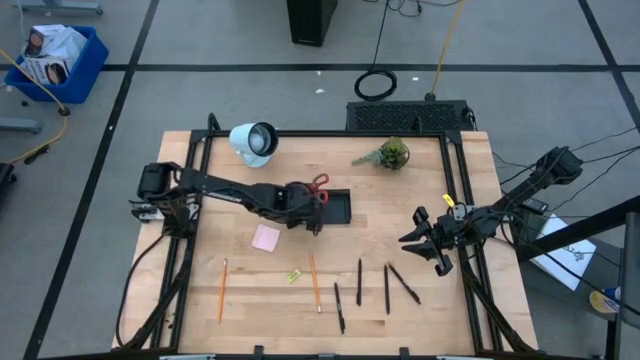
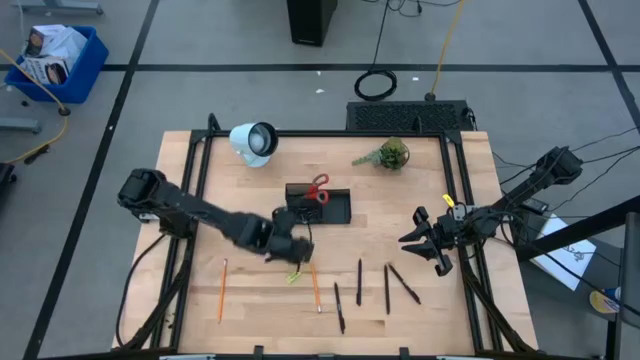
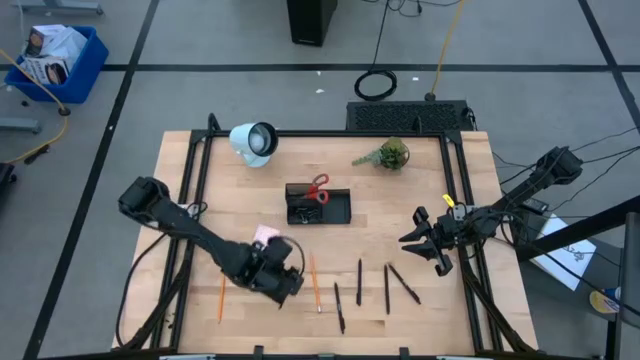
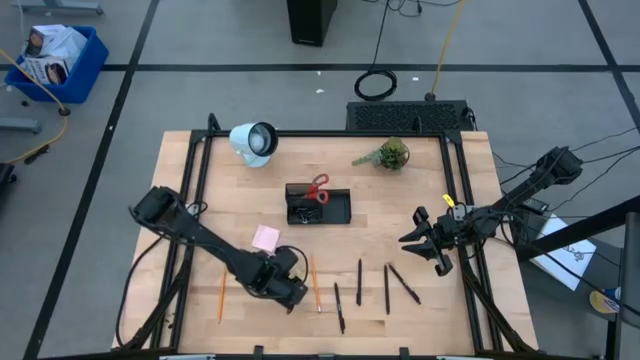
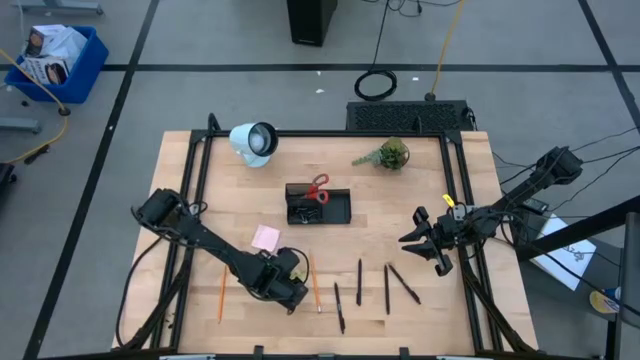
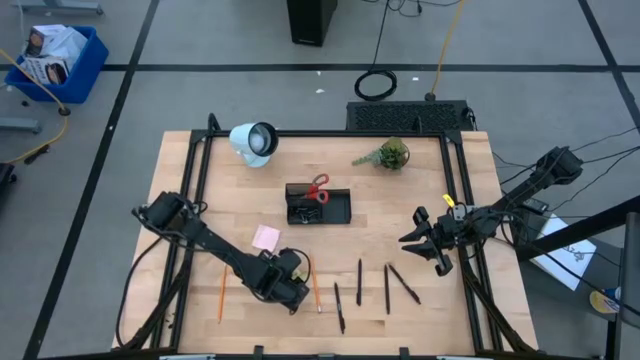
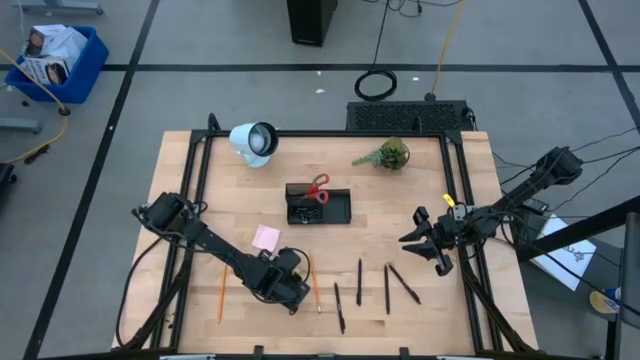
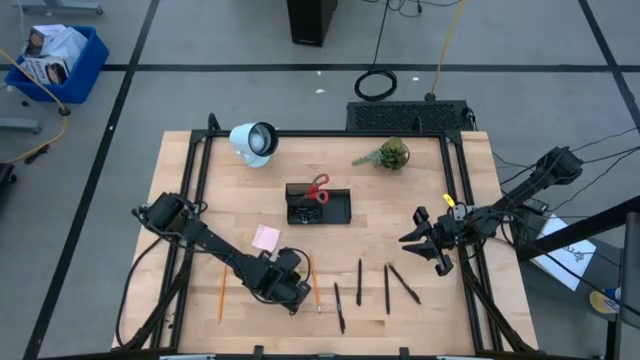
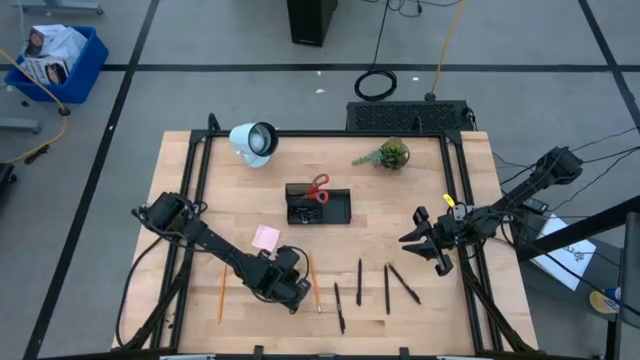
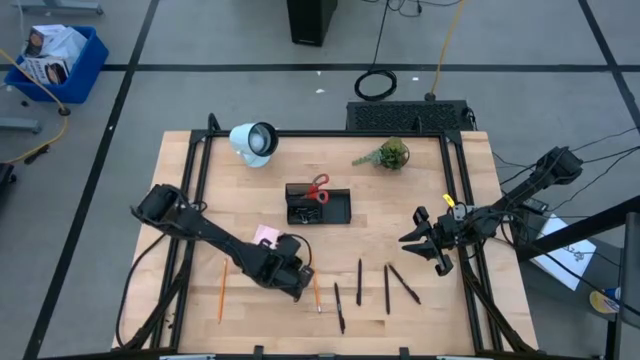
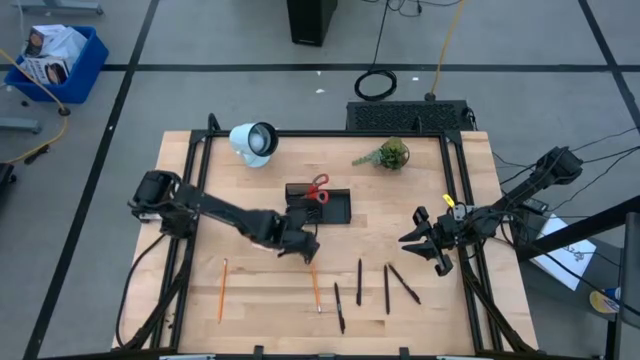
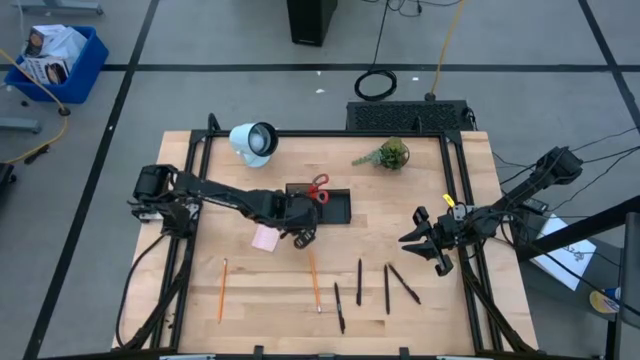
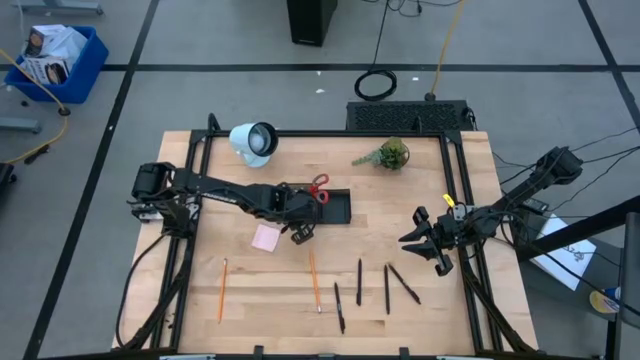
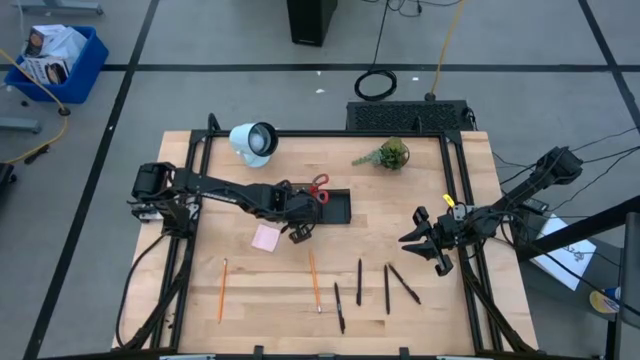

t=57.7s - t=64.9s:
Task: Pick and place office supplies into organizer
Put the yellow eraser into the black desk organizer

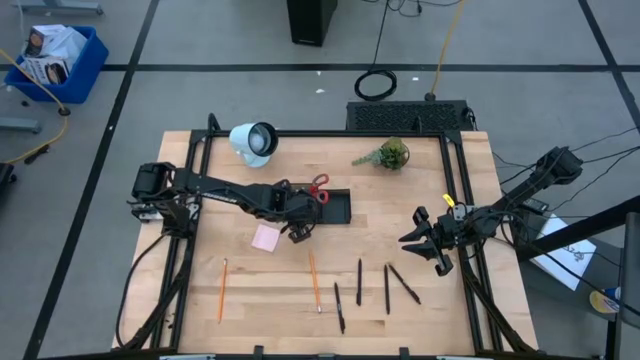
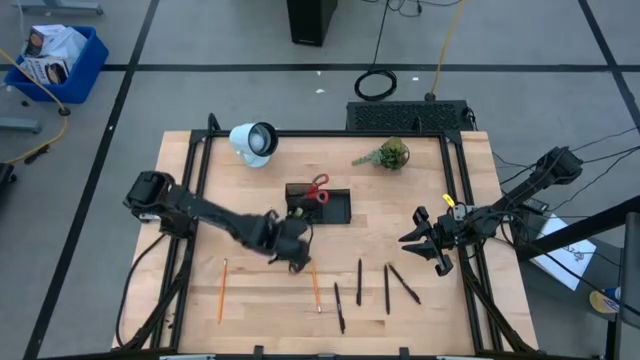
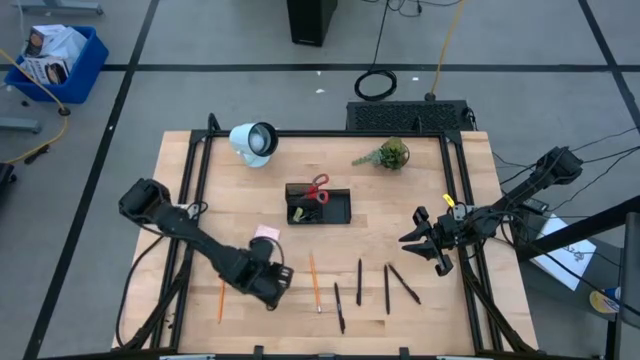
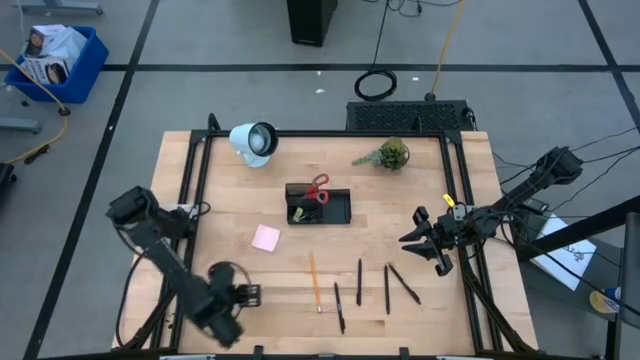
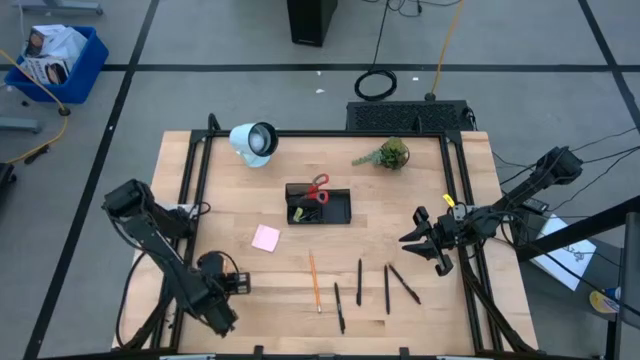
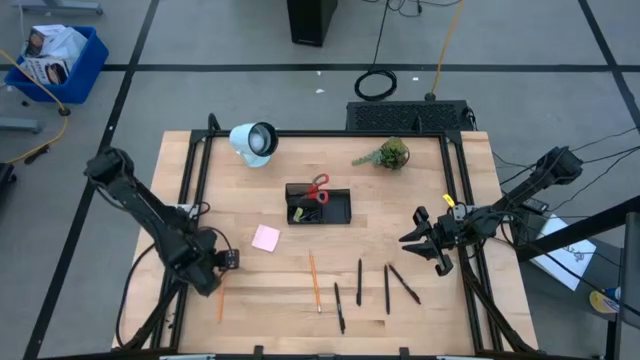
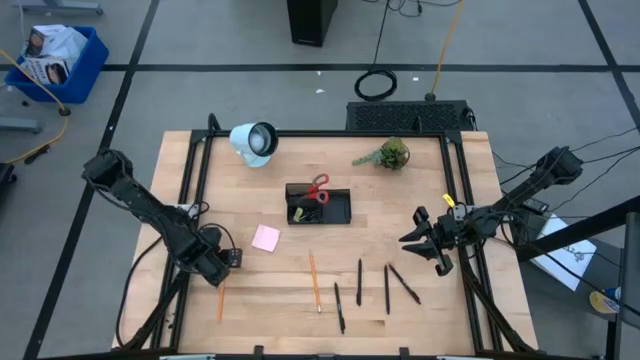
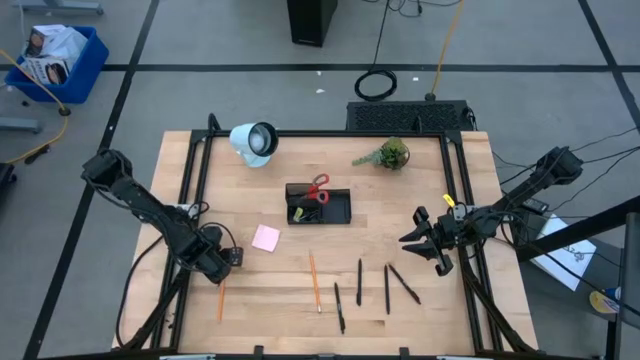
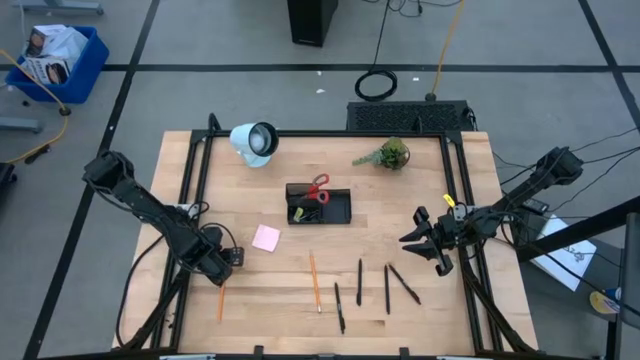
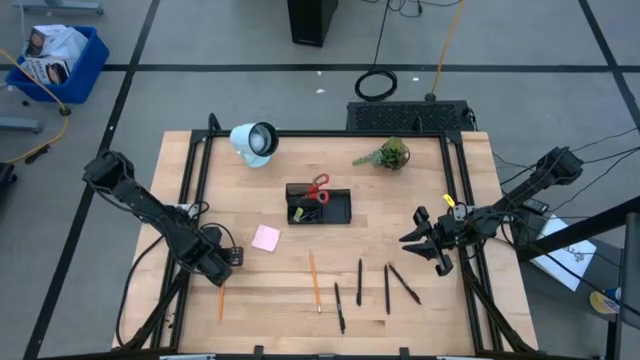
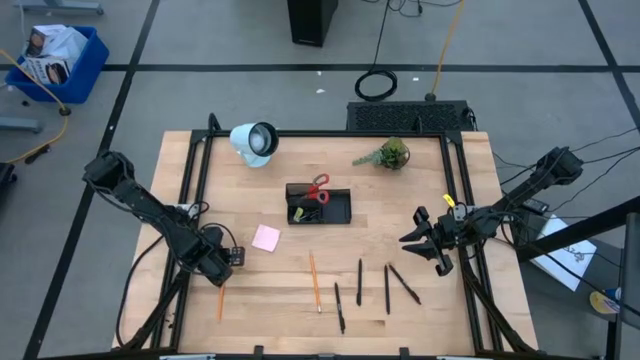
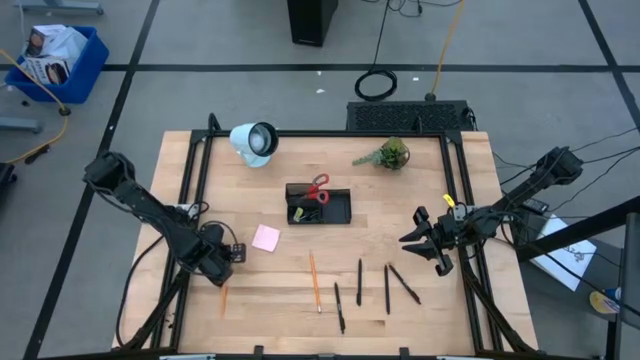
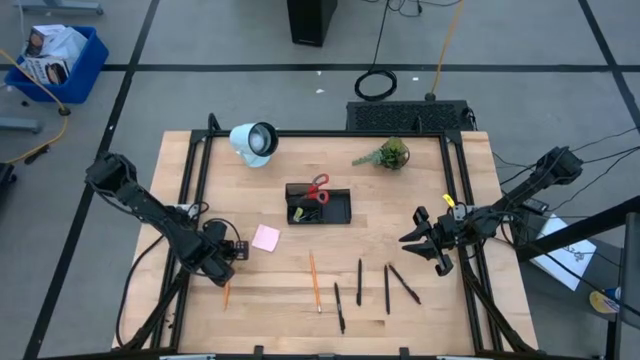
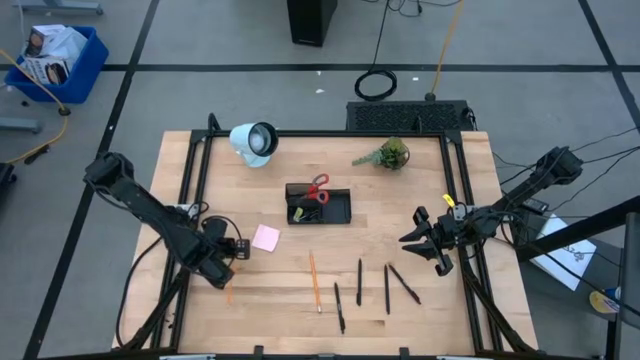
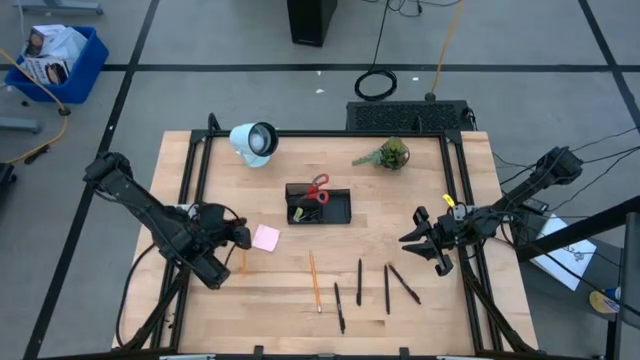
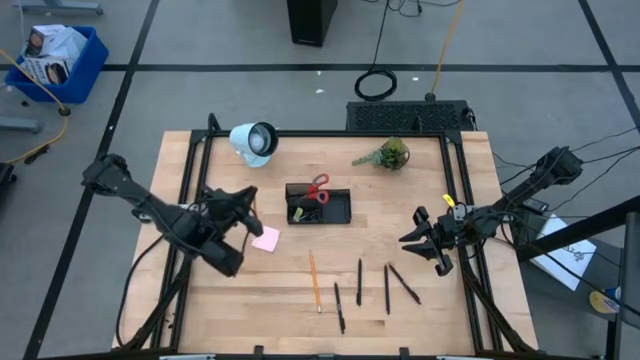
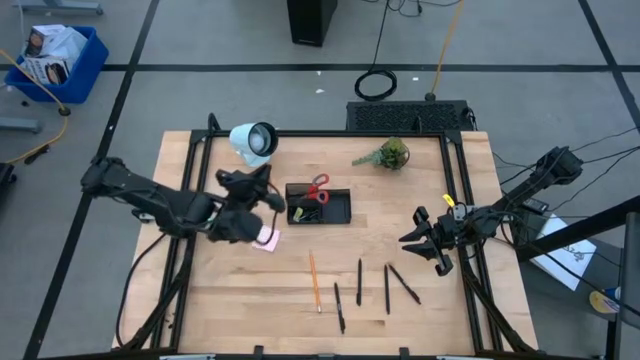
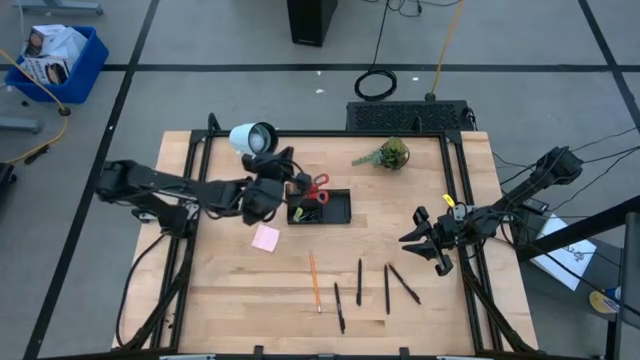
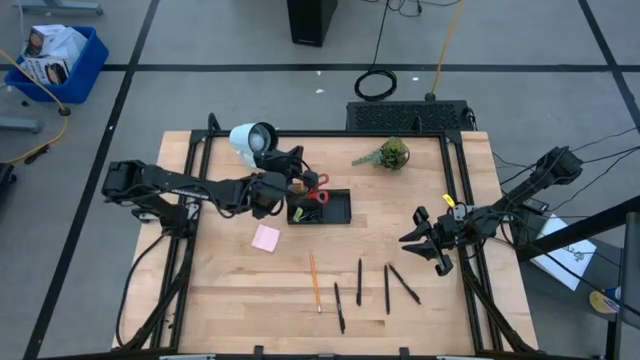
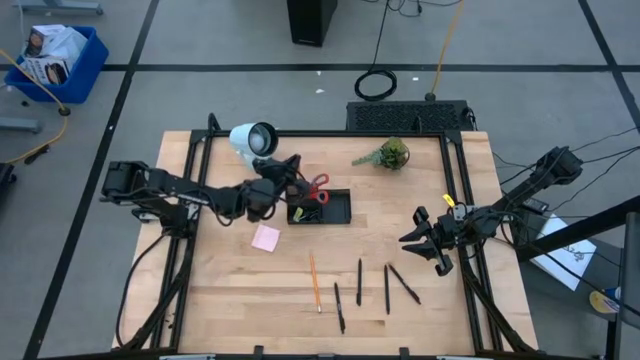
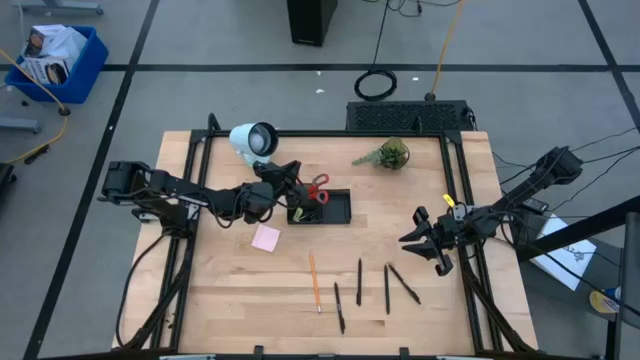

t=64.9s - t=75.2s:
Put the orange pencil into the black desk organizer

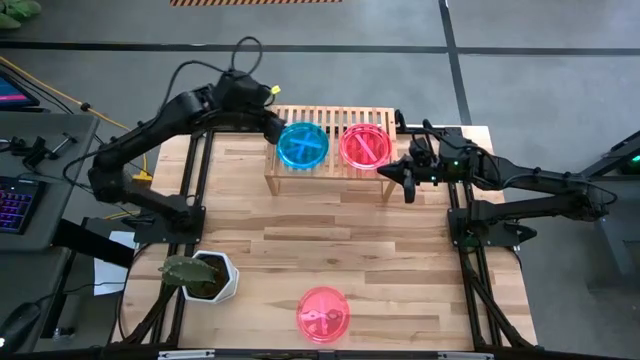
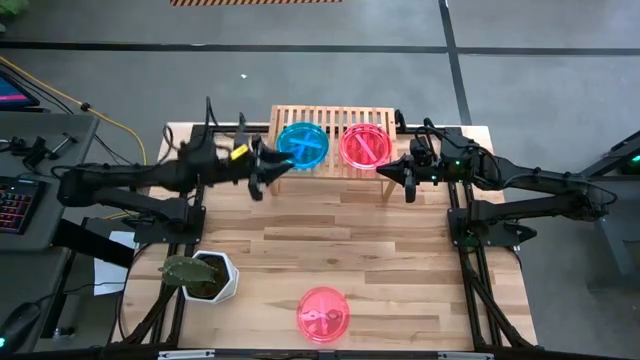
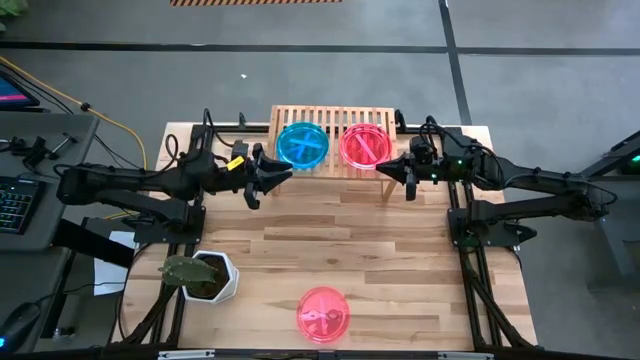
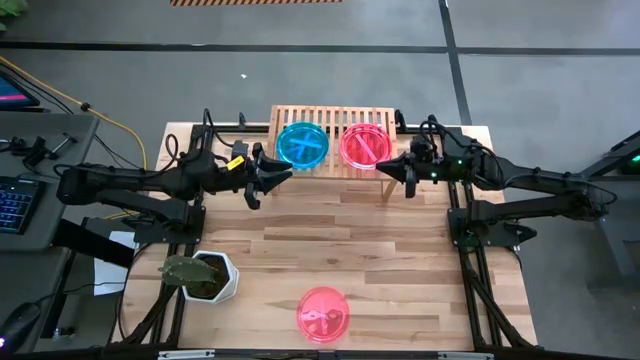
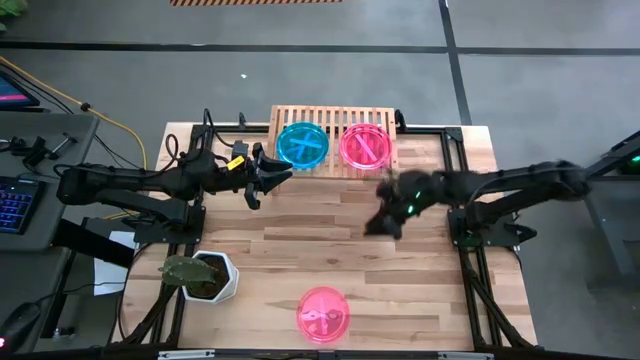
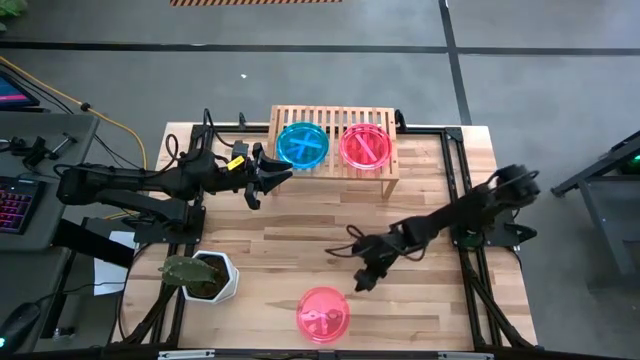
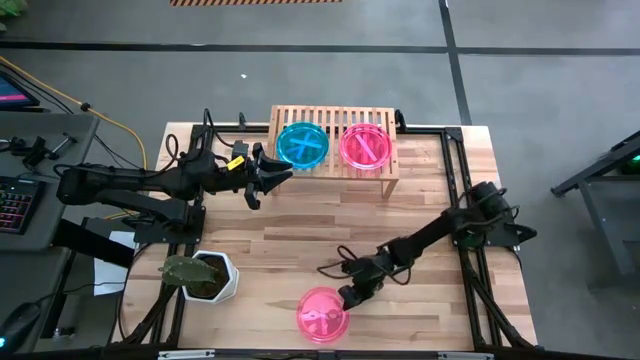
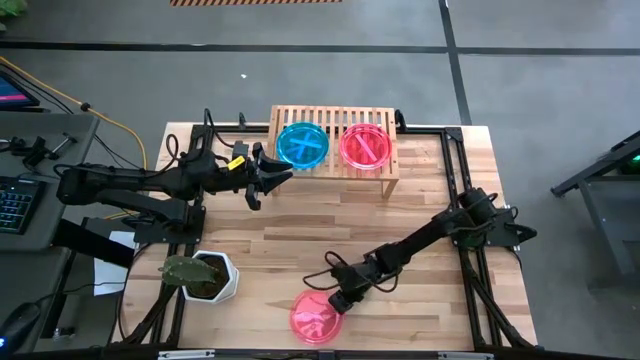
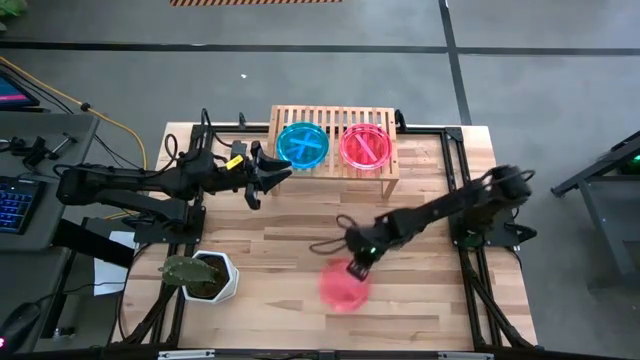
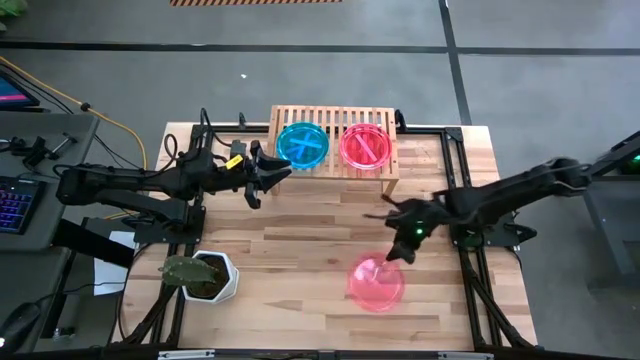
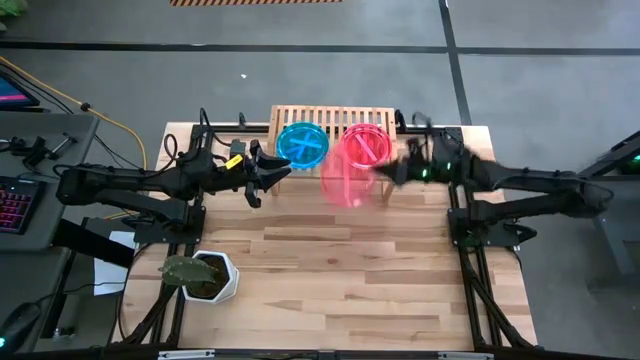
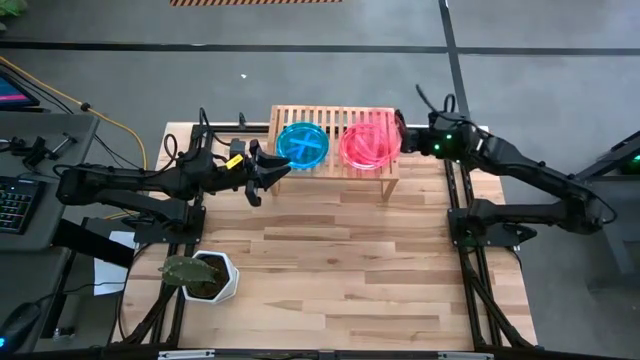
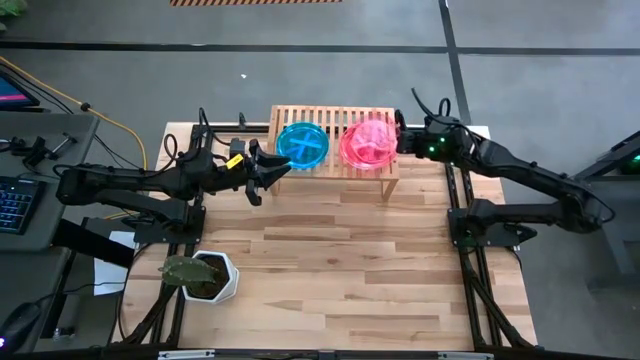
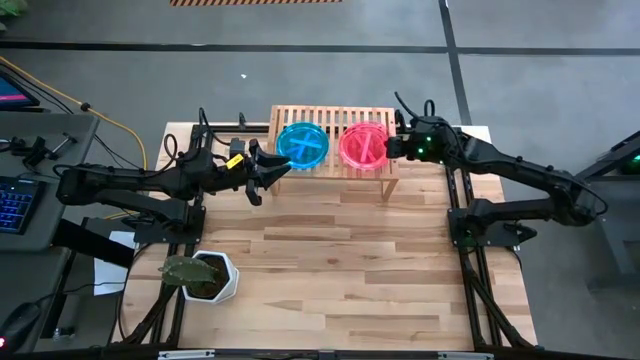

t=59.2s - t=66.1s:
Task: Place and stack plates onto a shelf
Stack the pink plate on the pink plate
